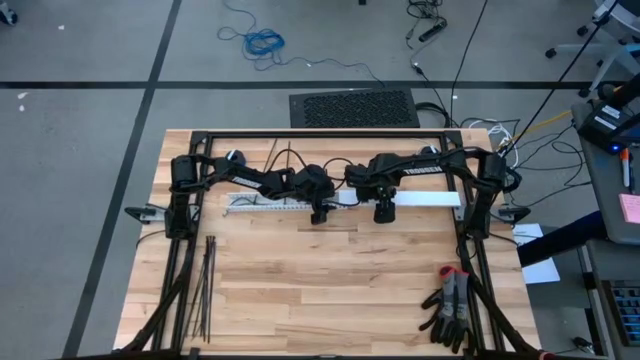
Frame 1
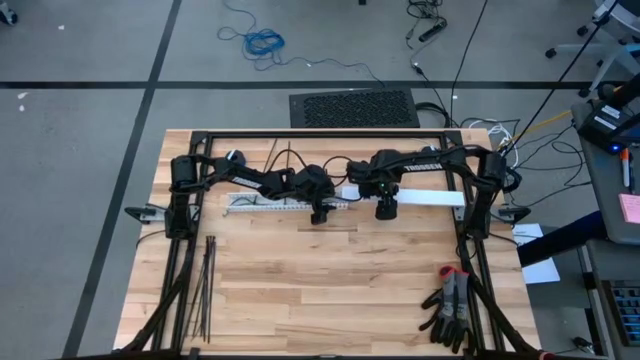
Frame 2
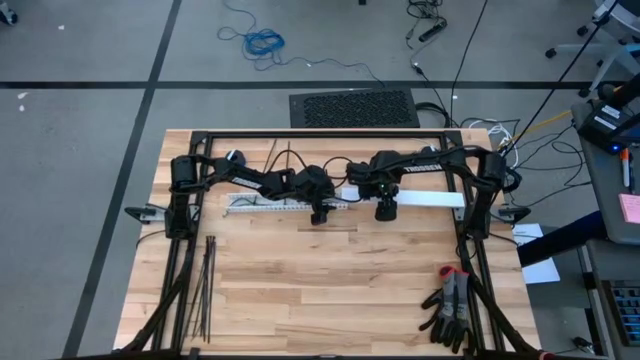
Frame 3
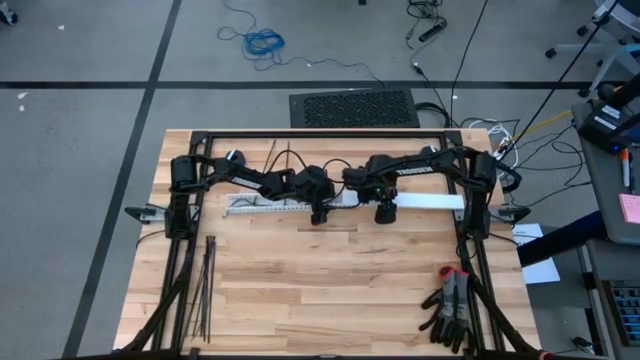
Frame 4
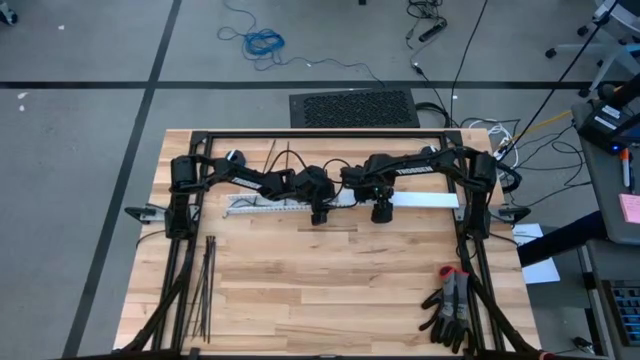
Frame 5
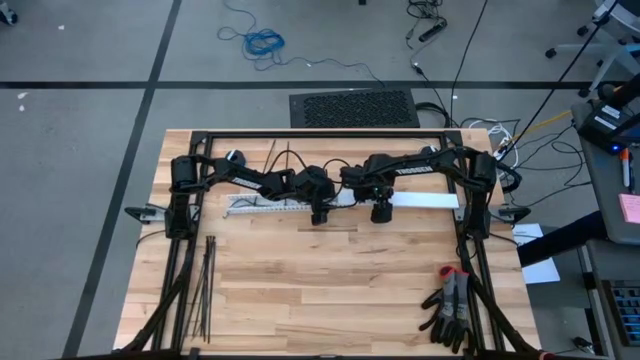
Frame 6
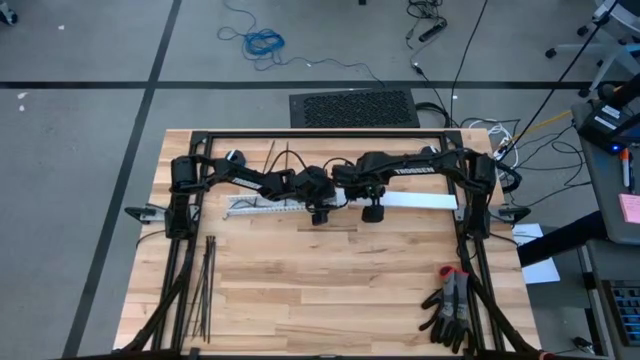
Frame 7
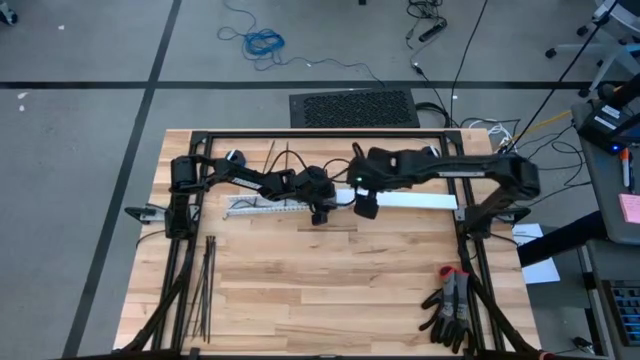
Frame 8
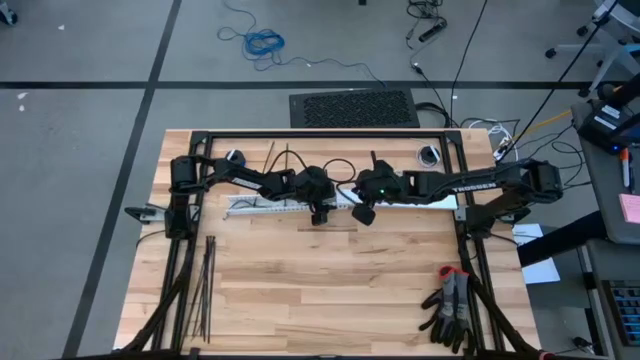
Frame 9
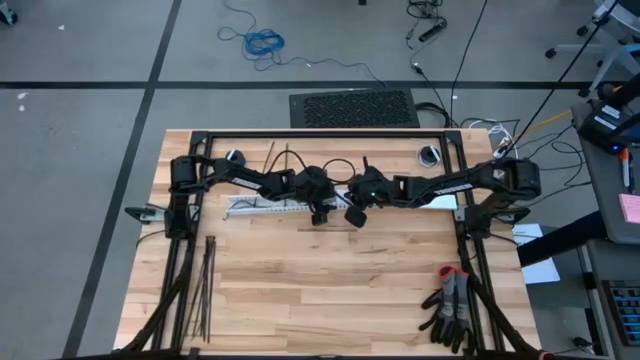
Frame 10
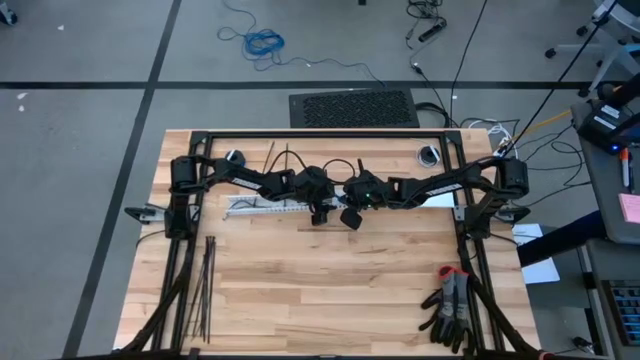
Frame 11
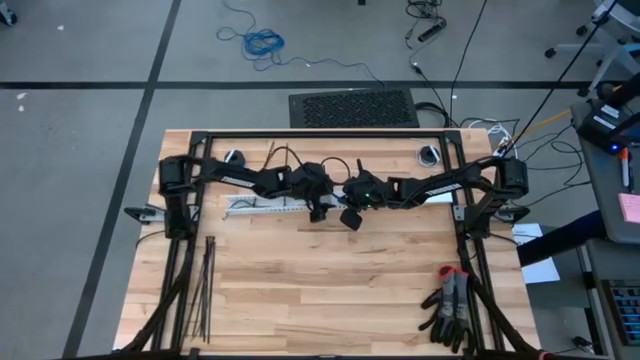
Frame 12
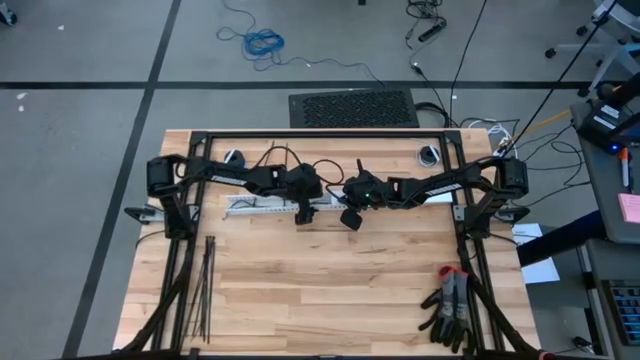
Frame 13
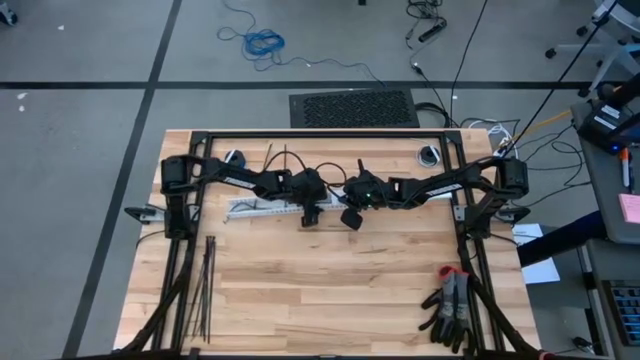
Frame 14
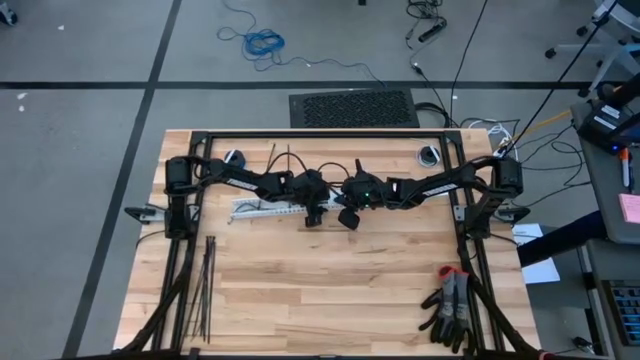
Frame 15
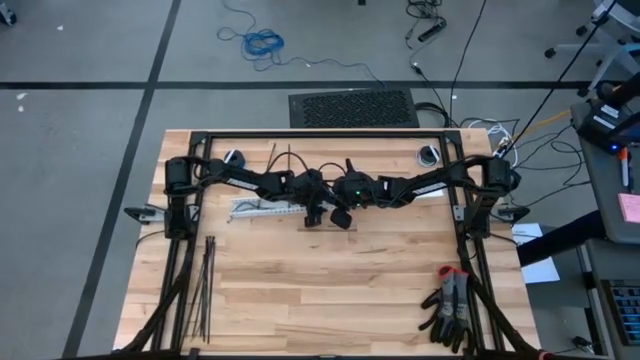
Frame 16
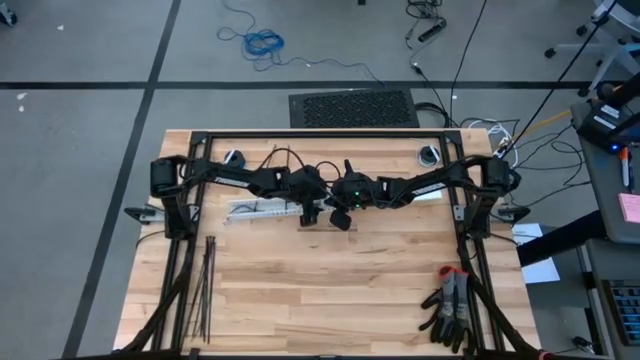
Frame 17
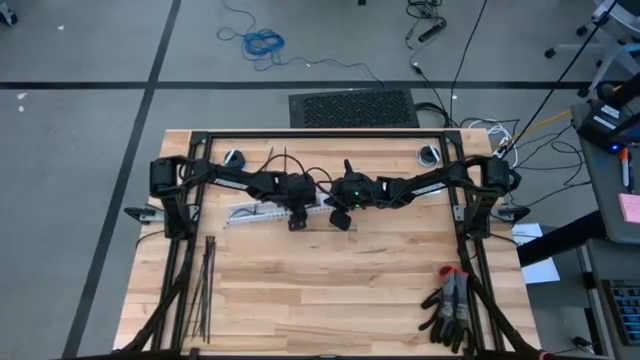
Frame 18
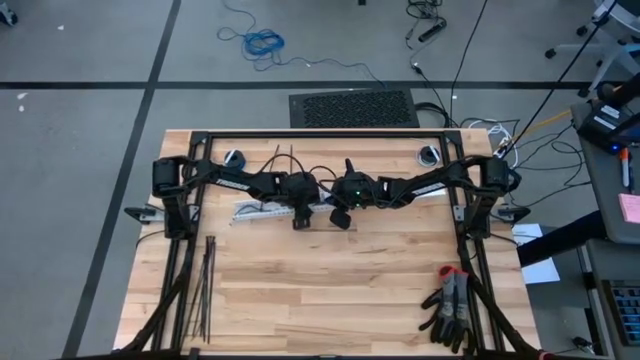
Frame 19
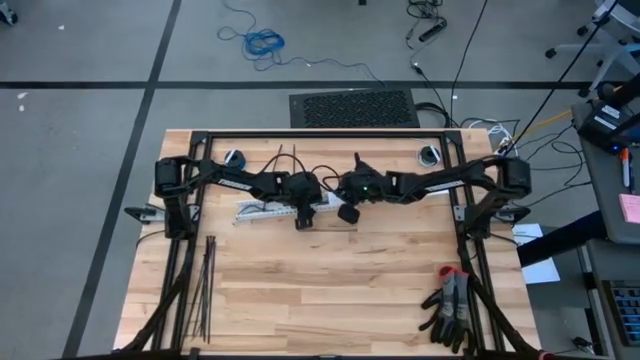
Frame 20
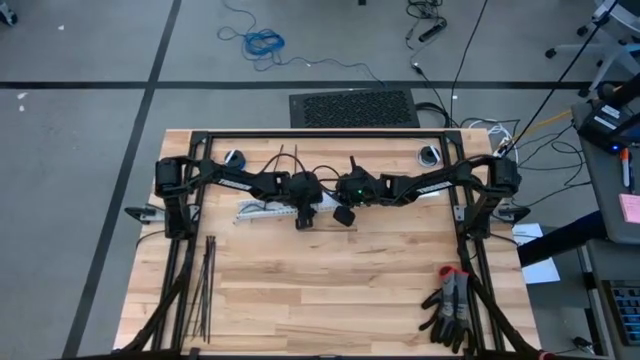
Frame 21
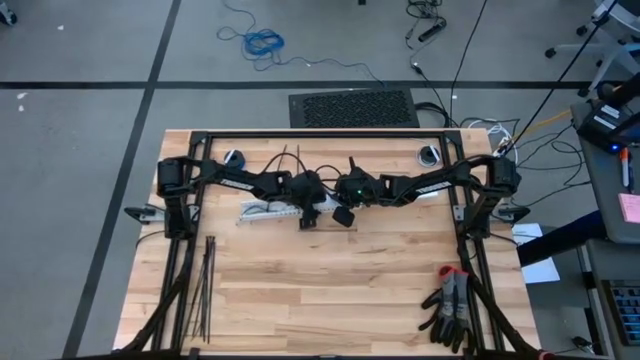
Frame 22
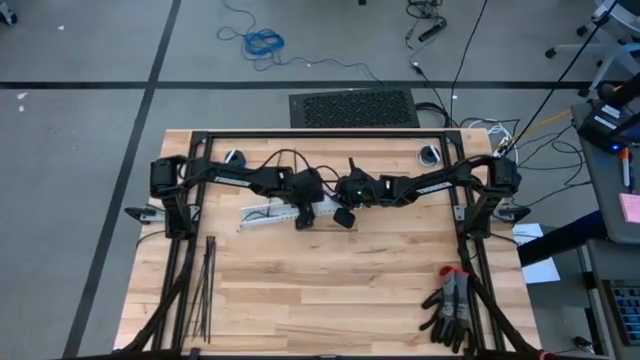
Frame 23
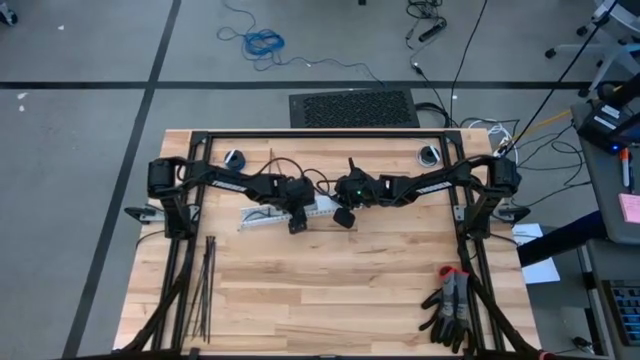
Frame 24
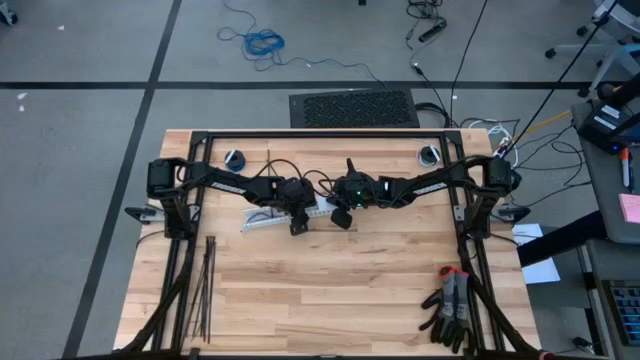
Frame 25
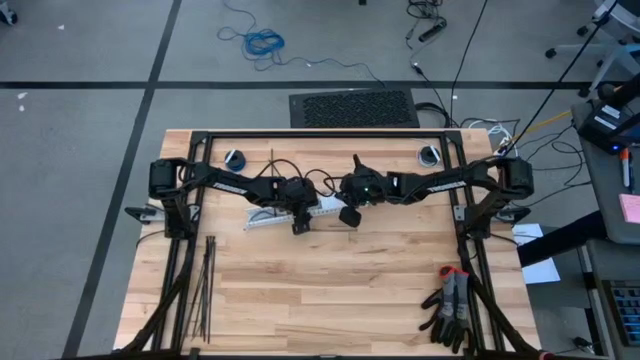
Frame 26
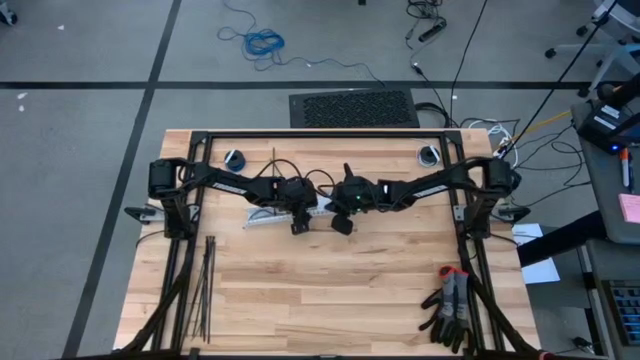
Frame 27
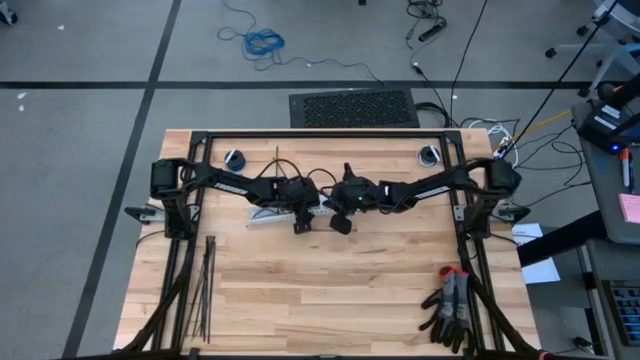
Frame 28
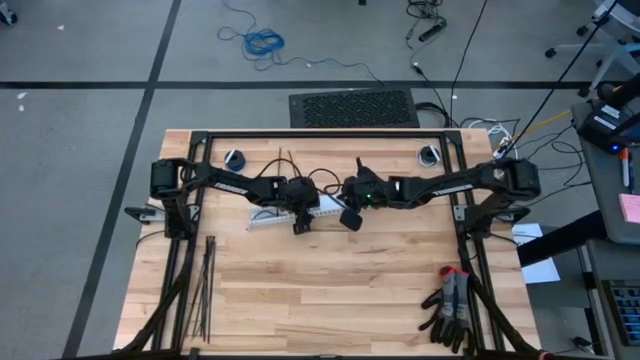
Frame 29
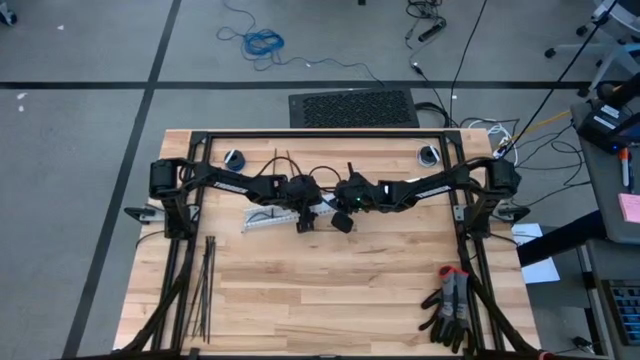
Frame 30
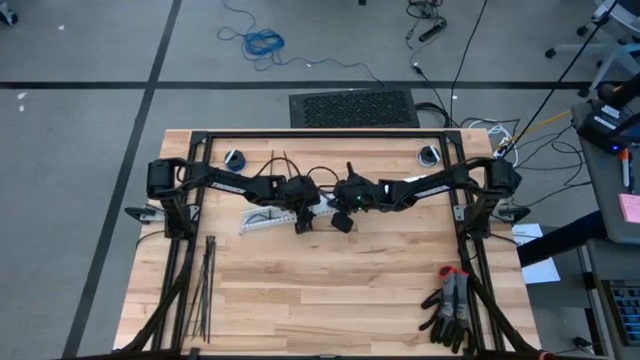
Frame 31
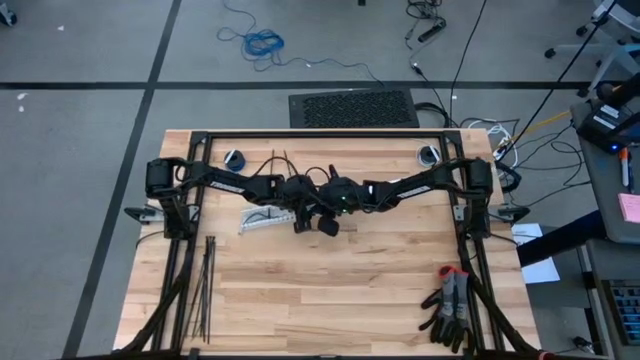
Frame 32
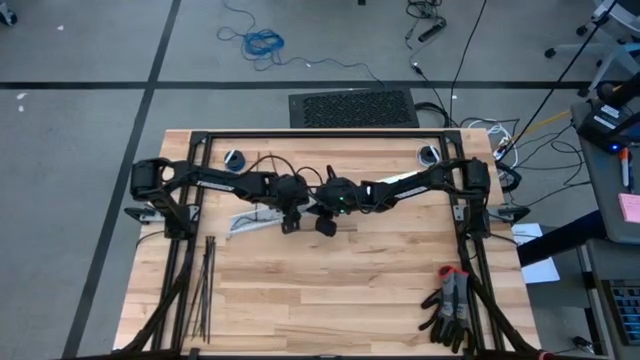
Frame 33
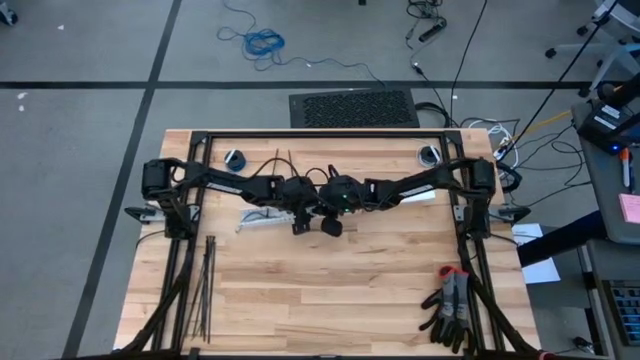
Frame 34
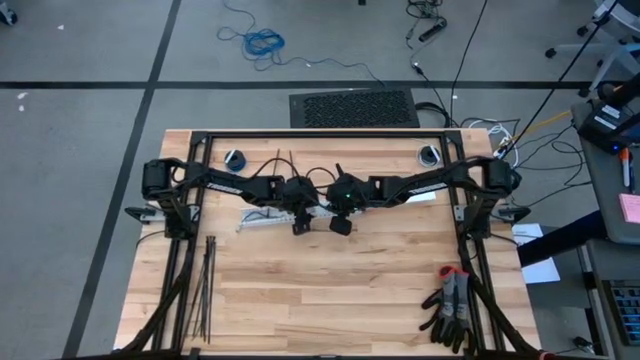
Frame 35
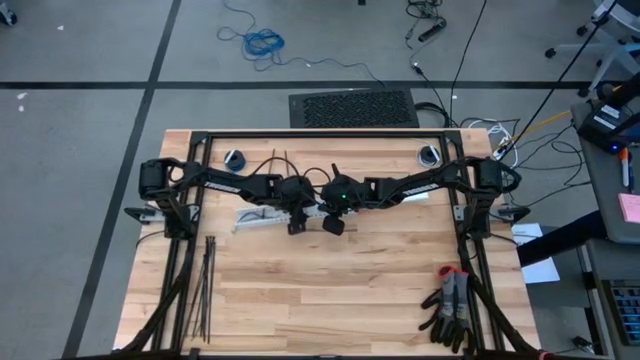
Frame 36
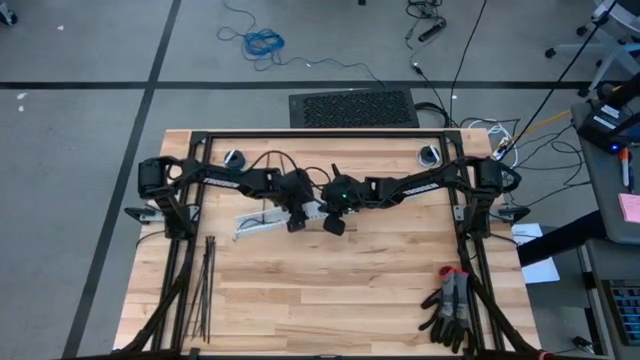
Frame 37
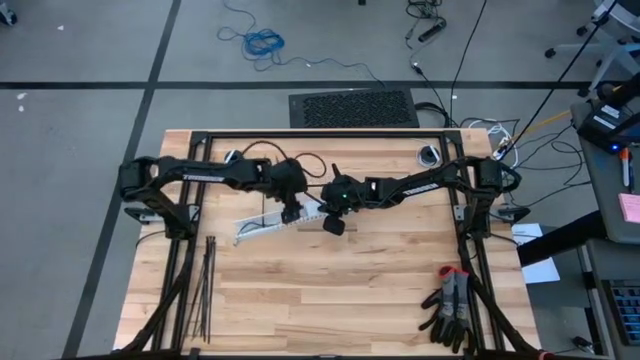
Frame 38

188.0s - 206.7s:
Task: Ziptie cables
Close the white cable duct

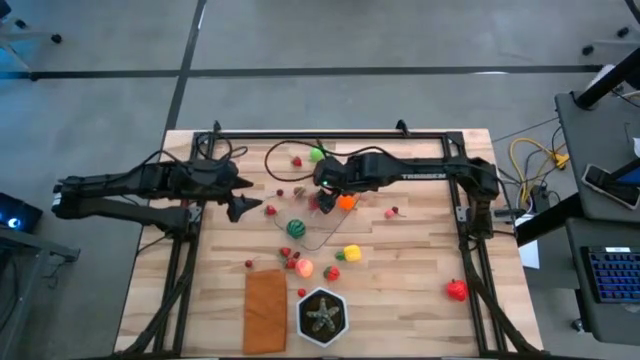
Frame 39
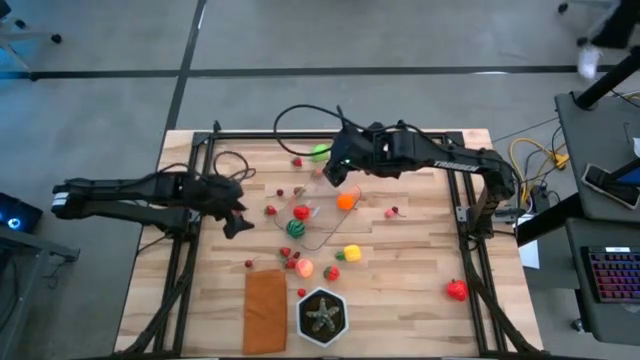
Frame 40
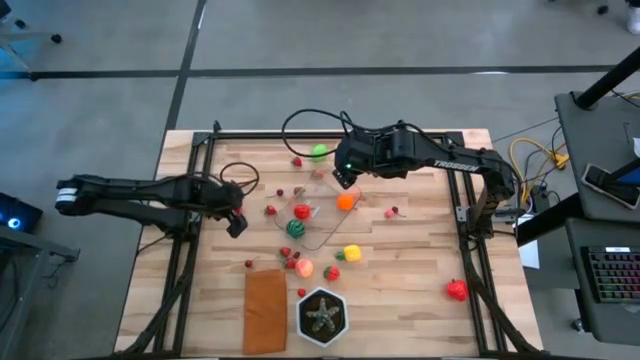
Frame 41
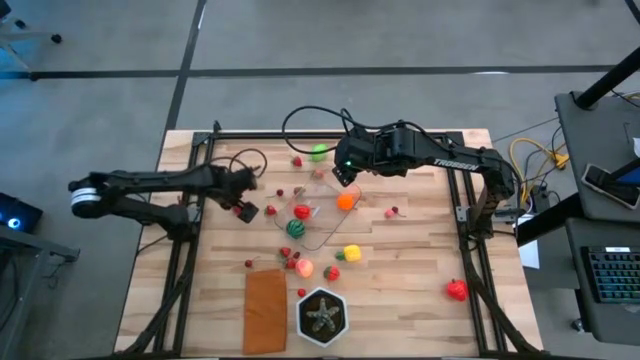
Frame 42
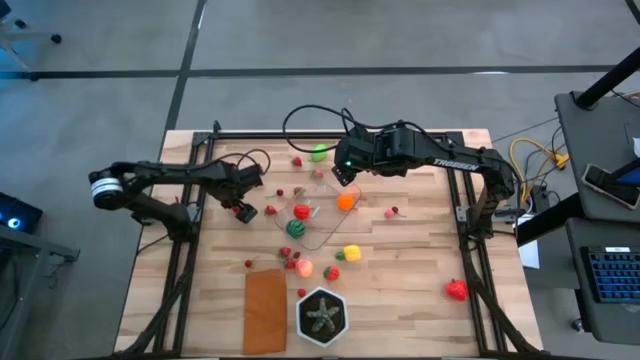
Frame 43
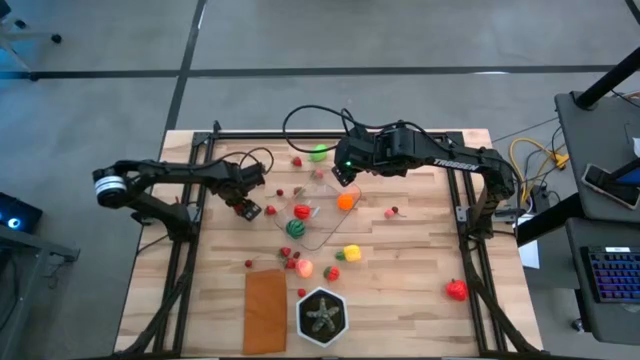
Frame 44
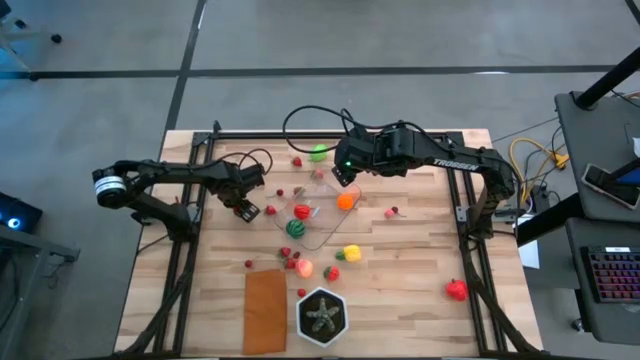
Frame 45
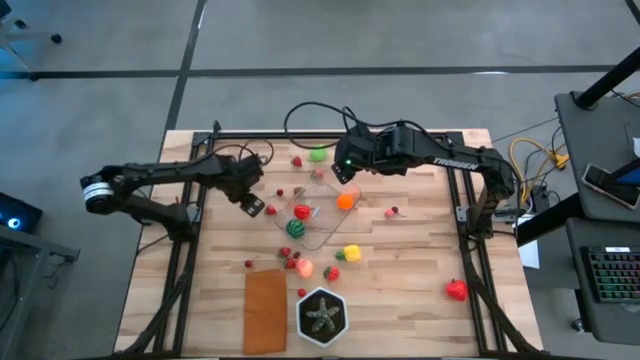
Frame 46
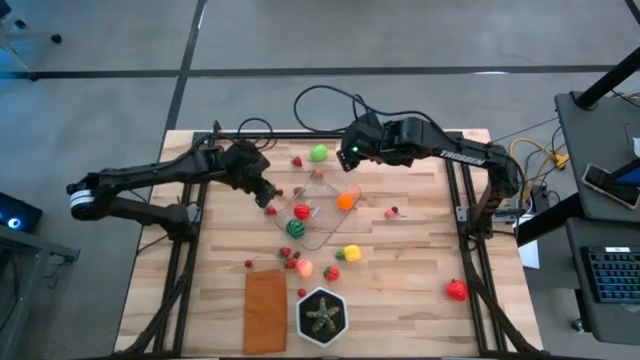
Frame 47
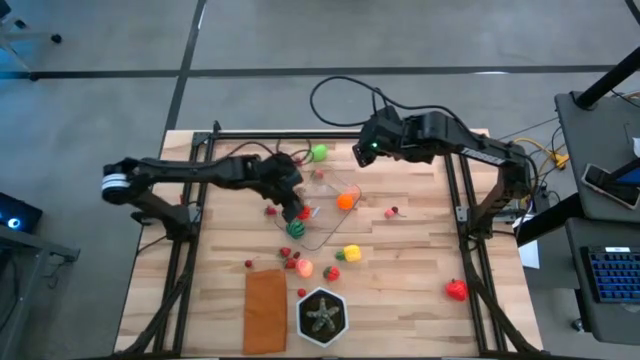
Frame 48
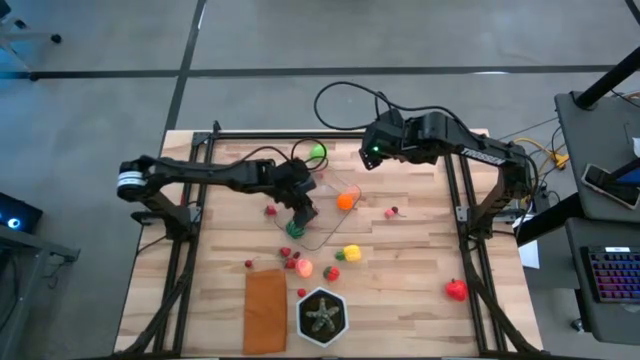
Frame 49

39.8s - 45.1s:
Task: Pick and placing Produce into tupperware
Put the red strawberry into the transparent bin
